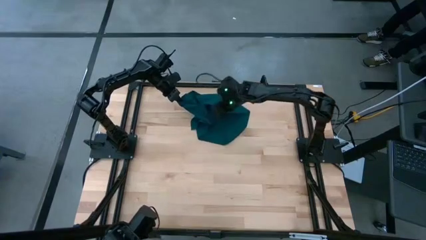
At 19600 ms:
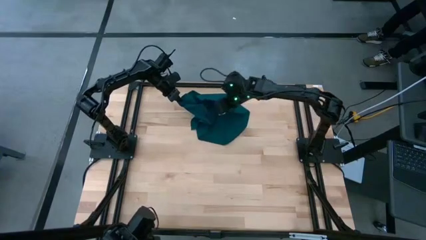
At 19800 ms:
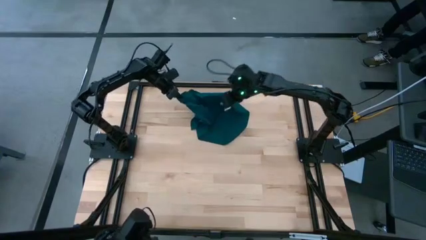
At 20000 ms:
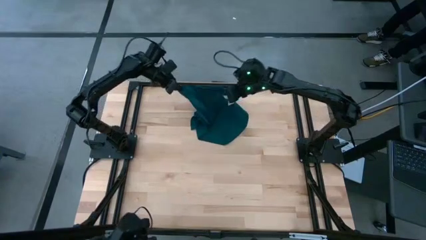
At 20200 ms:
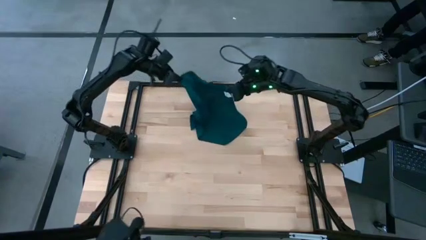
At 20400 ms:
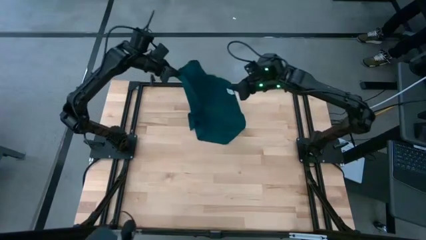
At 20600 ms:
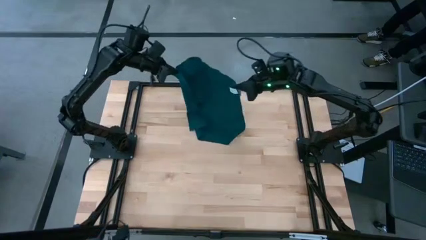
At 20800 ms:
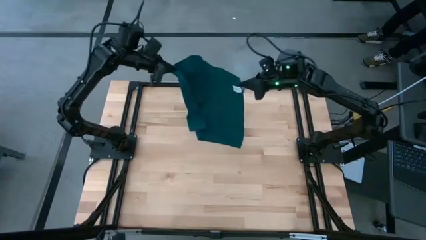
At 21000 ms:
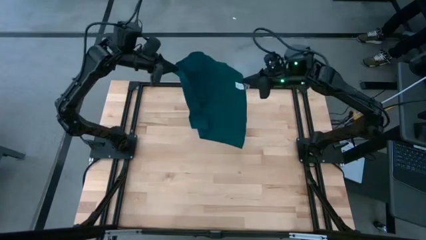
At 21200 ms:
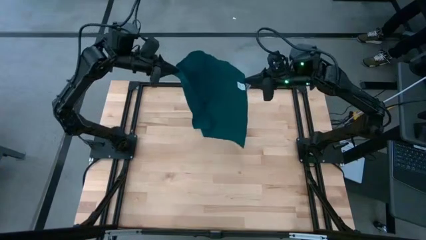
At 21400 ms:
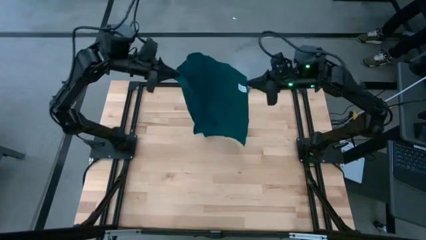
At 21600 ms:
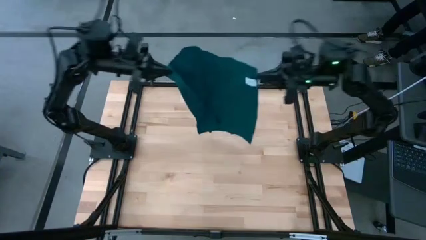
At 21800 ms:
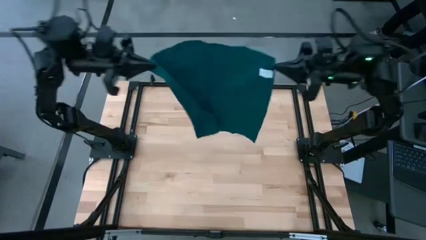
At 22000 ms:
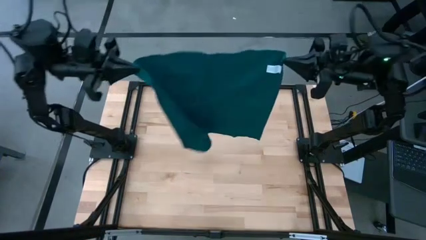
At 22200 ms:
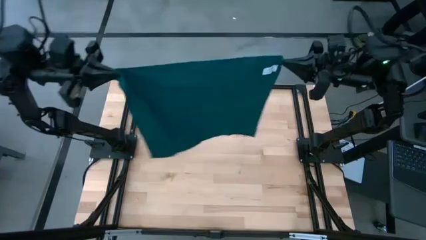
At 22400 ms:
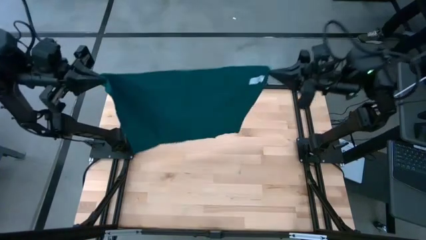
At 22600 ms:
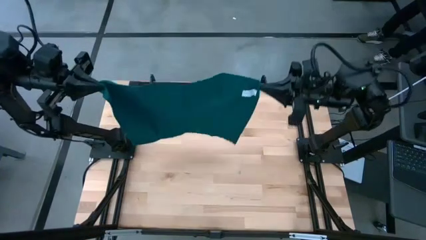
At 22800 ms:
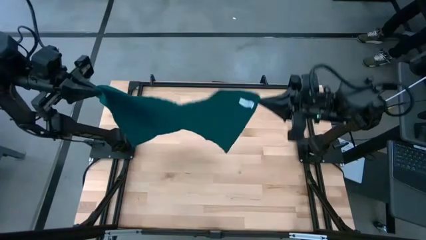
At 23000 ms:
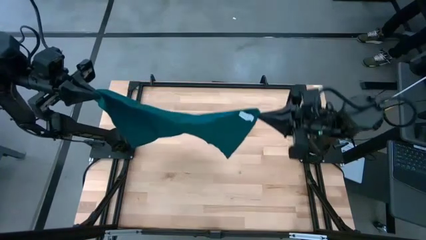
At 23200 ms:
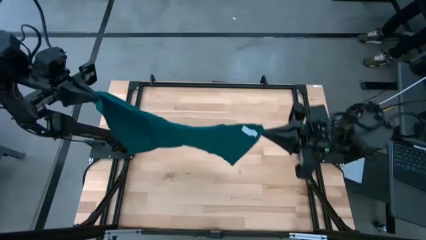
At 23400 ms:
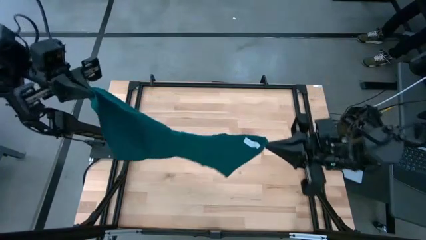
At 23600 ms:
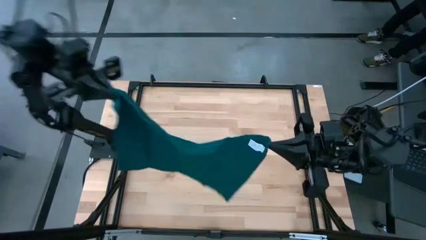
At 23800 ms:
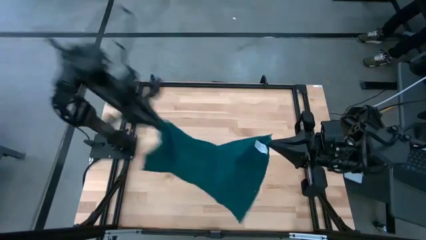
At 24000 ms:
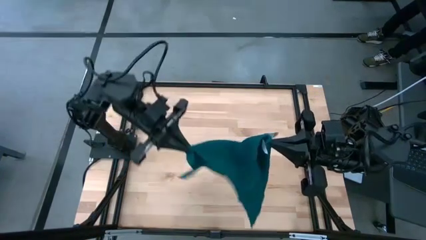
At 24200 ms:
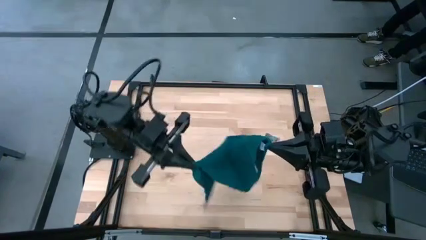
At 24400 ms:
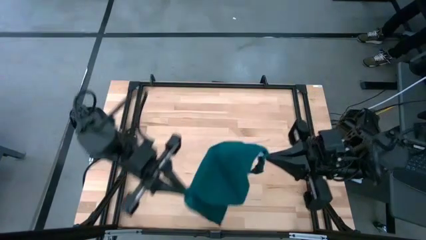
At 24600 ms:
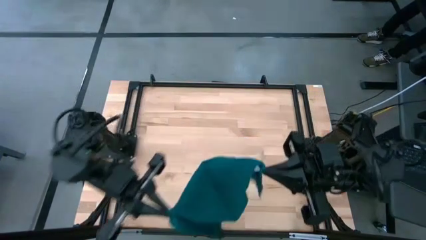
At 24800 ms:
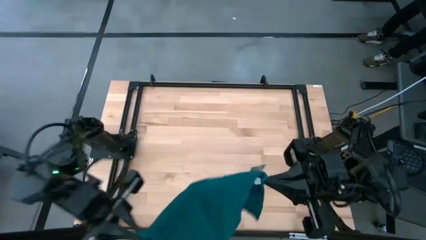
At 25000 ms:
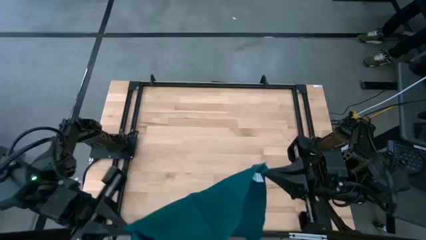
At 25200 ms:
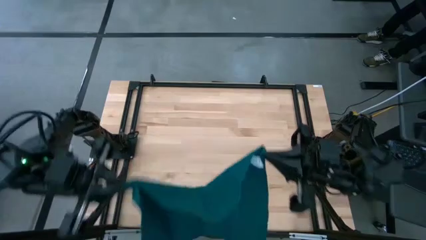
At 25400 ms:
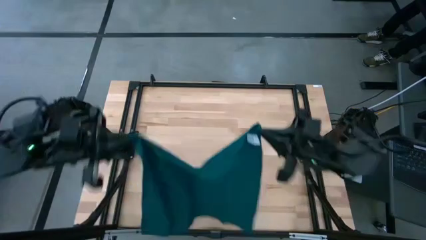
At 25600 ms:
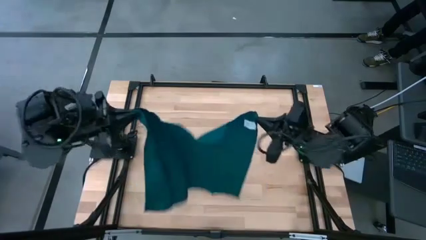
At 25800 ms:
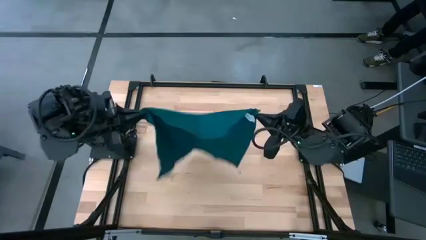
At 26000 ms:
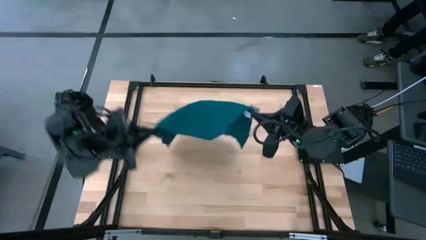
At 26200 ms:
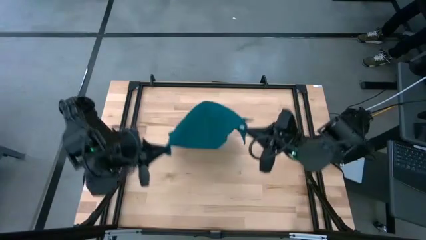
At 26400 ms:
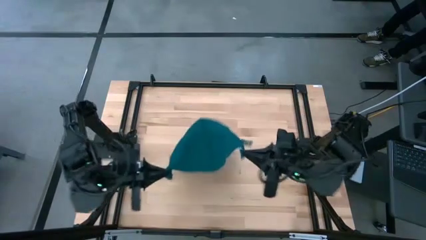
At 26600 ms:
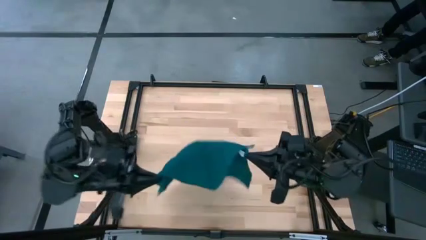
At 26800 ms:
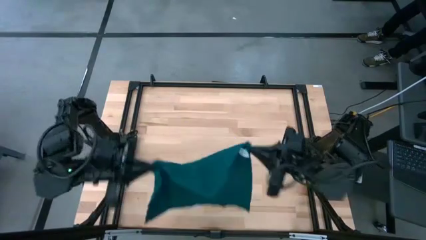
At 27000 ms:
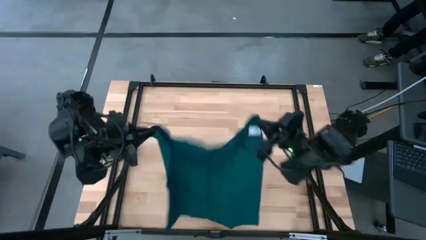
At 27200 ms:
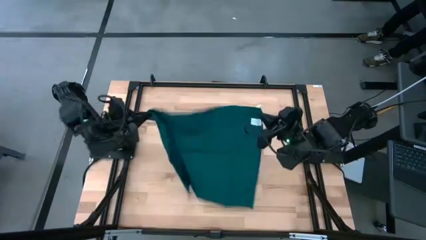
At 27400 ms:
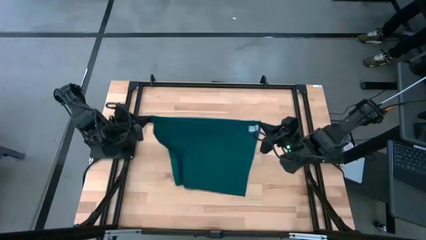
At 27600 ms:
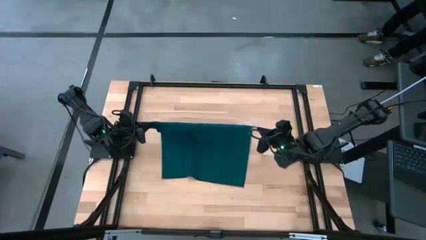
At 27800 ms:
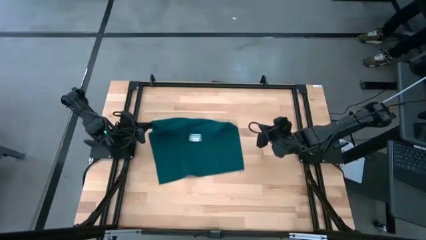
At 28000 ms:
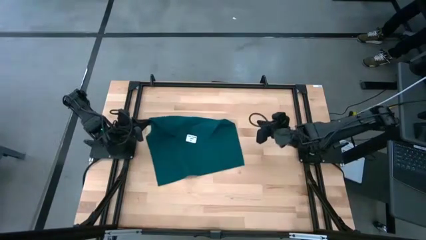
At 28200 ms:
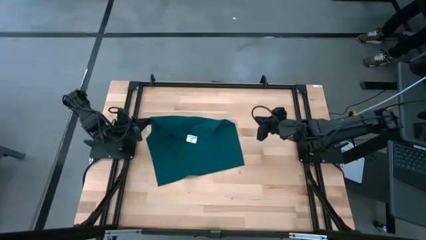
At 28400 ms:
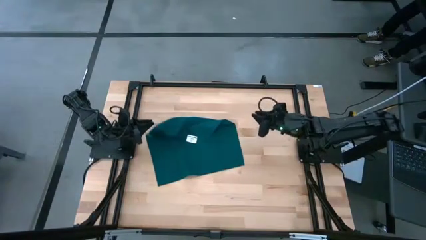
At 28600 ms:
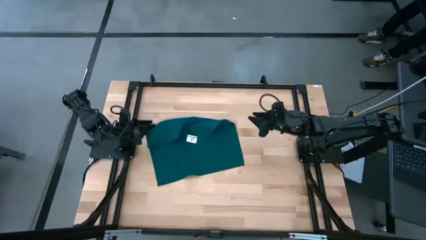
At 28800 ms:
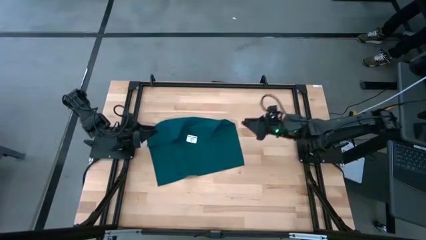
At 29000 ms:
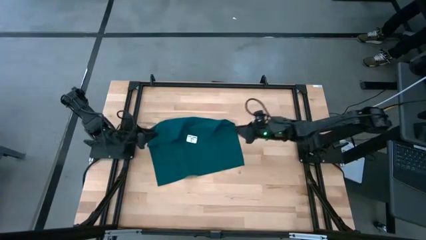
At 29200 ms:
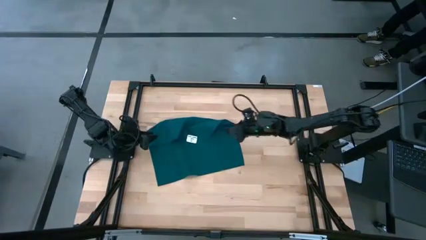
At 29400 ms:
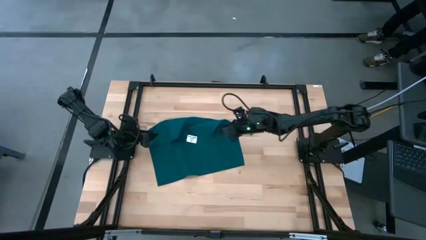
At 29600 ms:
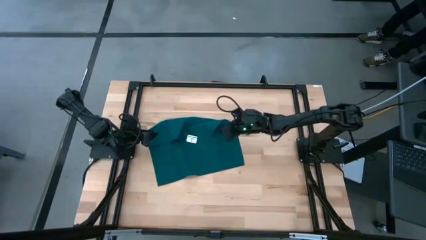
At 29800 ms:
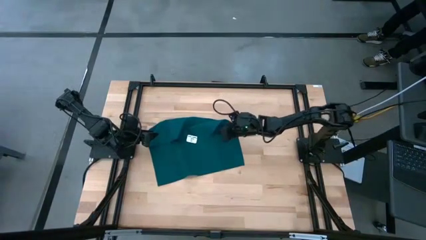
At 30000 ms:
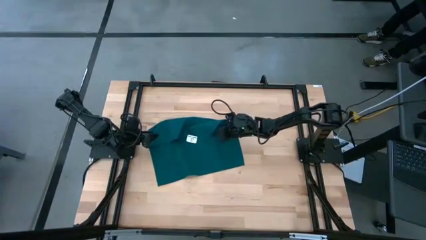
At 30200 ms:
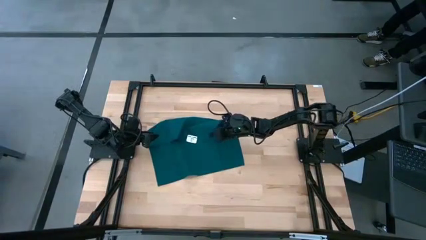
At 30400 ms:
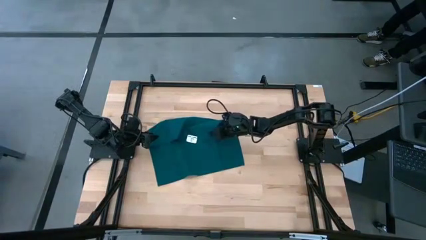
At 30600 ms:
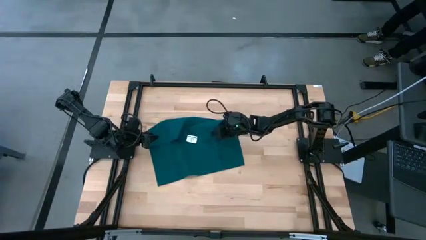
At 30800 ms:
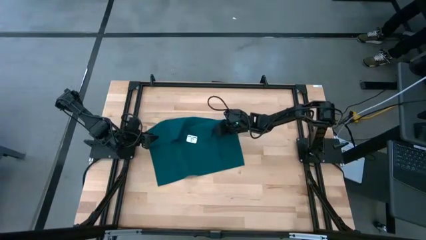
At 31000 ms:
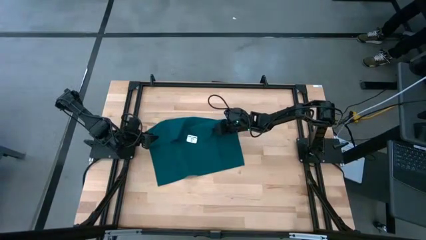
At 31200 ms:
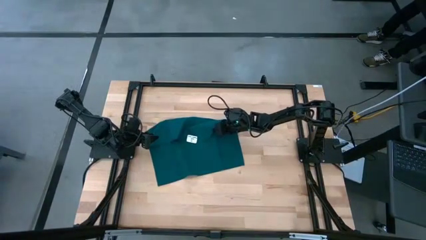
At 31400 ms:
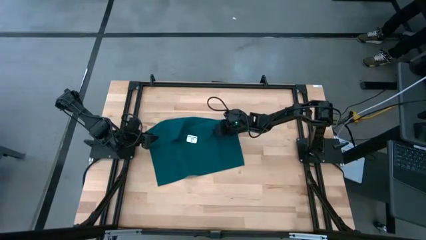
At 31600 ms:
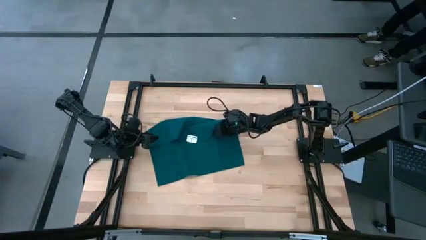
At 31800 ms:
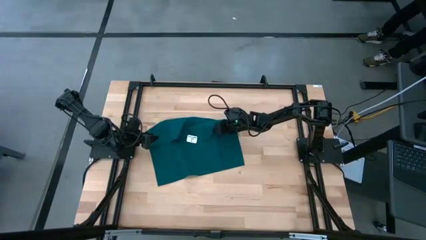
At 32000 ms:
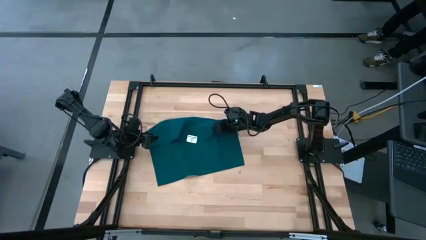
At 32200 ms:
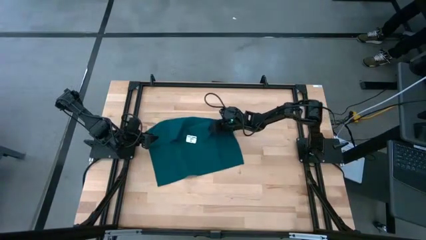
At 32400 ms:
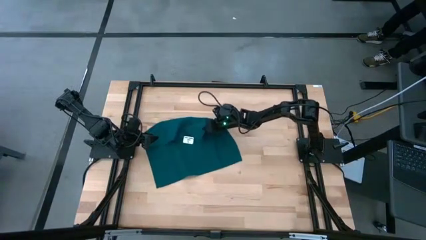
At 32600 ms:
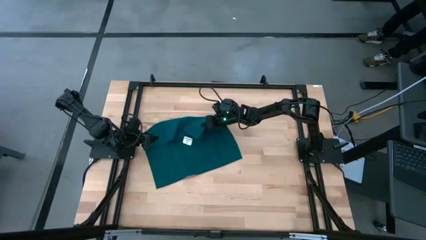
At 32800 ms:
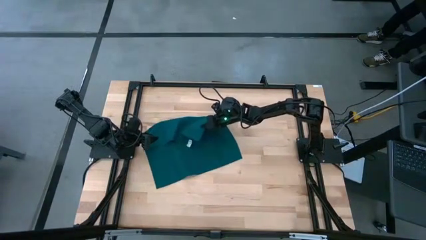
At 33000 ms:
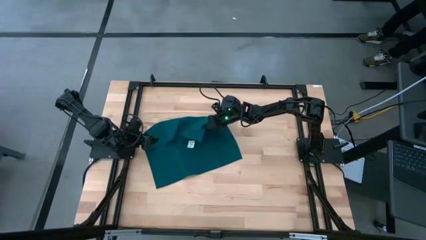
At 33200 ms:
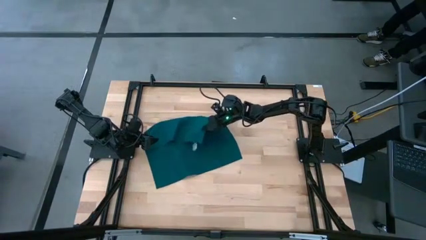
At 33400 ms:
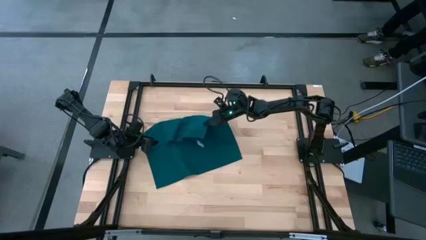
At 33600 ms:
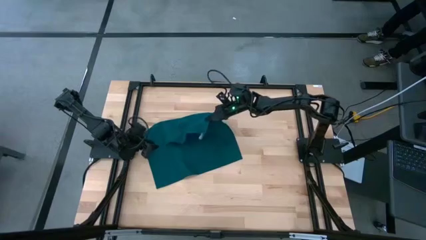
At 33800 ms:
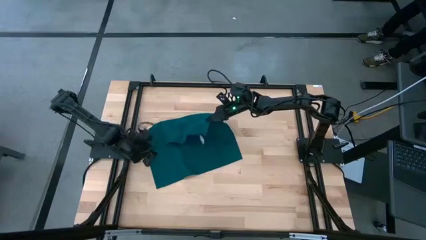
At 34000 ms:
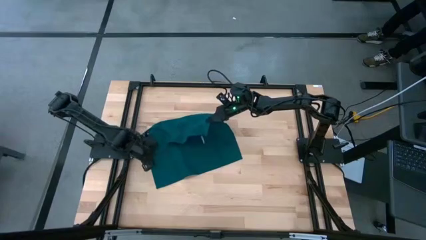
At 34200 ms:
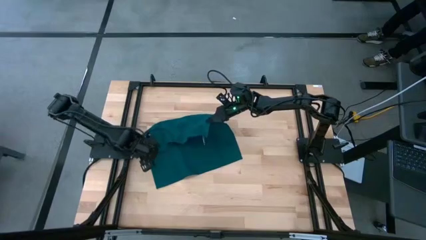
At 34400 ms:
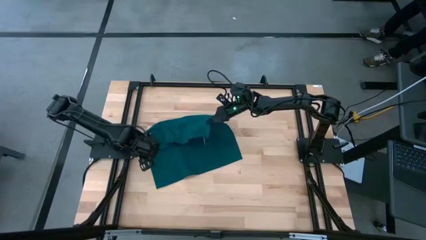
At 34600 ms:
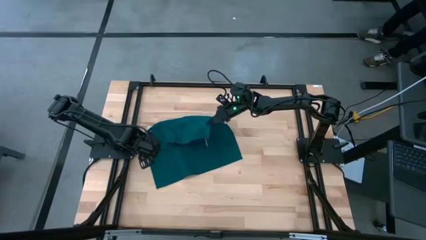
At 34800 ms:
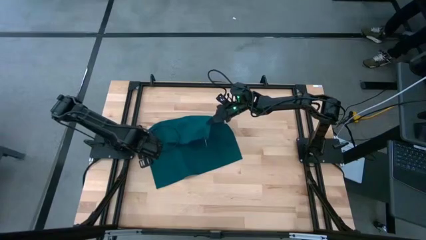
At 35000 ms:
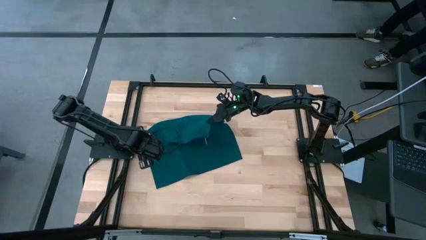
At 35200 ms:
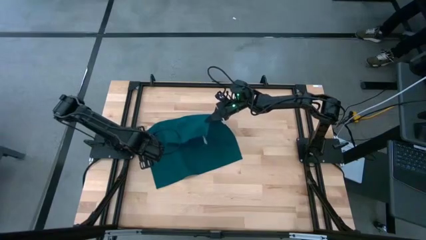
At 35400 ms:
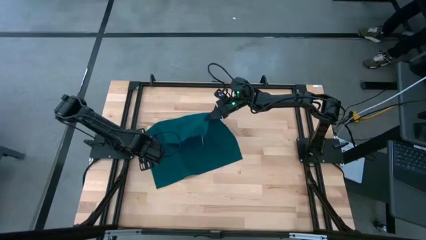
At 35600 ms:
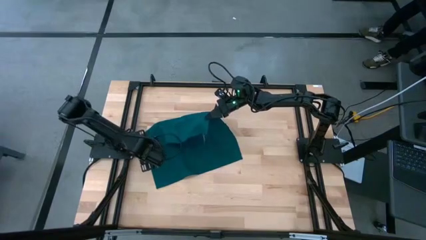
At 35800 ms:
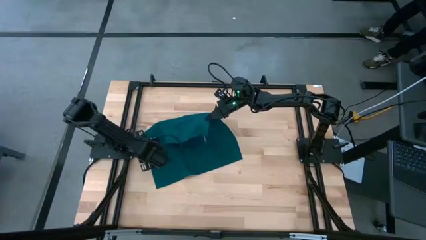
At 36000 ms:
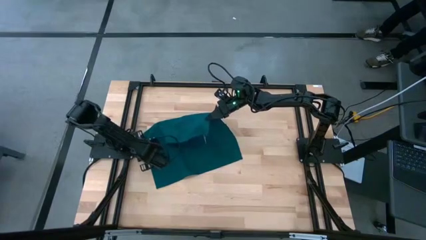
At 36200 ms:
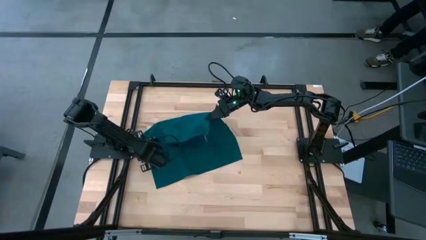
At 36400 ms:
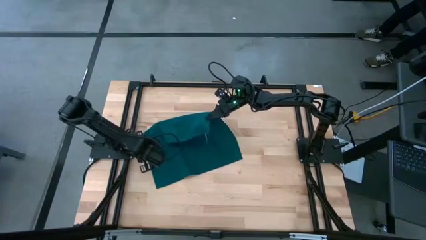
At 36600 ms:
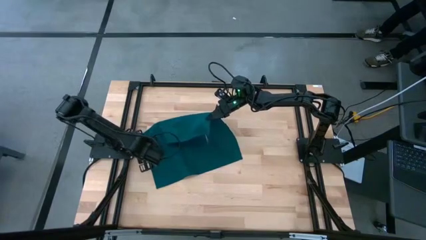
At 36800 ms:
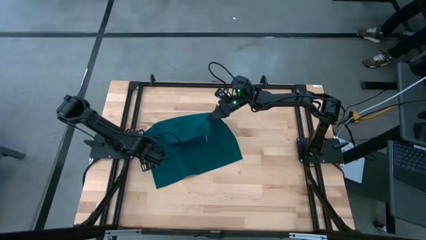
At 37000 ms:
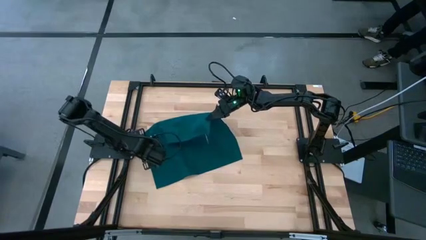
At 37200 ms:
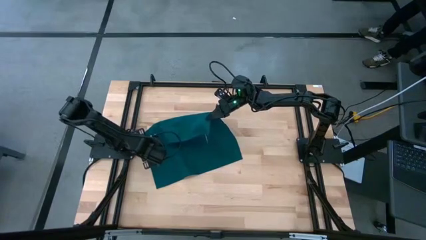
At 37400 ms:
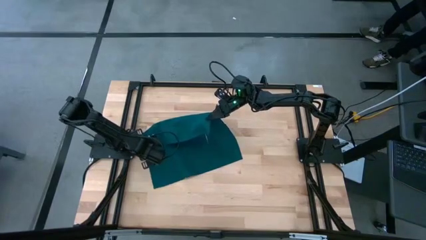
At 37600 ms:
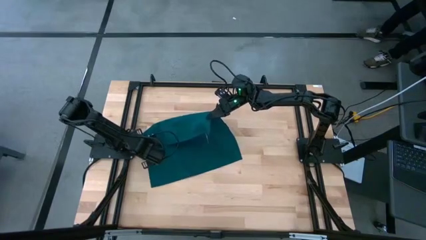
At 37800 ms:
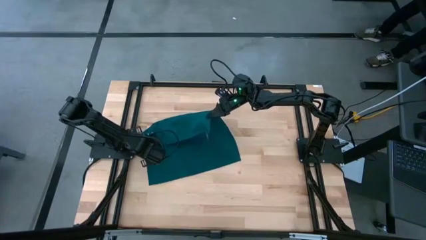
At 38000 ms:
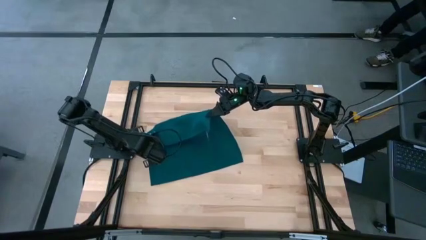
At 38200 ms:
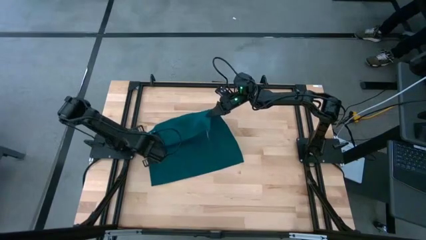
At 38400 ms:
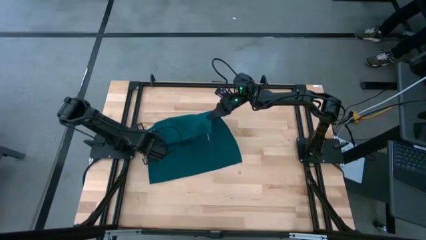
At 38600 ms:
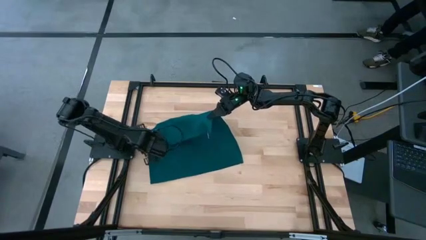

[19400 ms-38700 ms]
Task: Fold microfiber towels
Fold the black towel on the table
